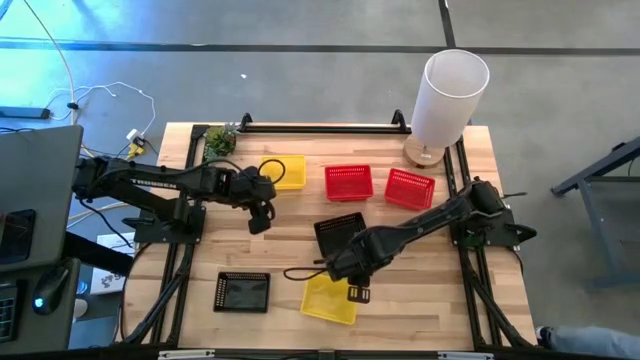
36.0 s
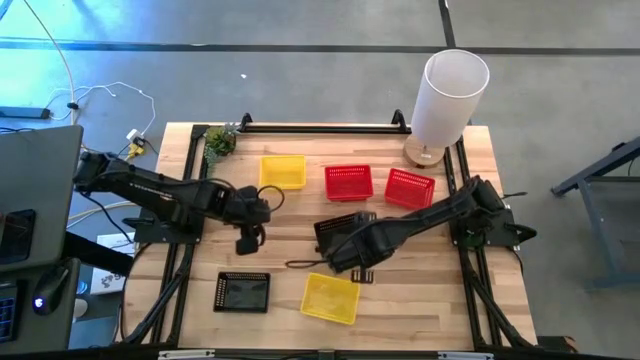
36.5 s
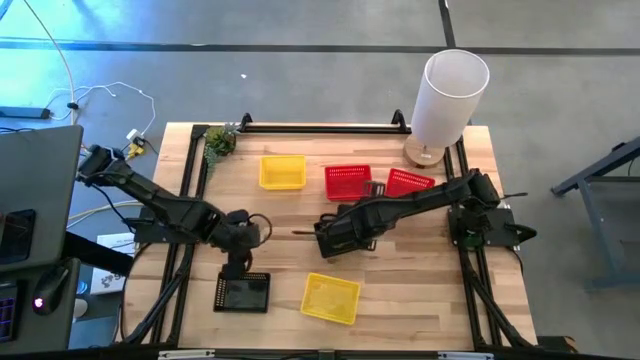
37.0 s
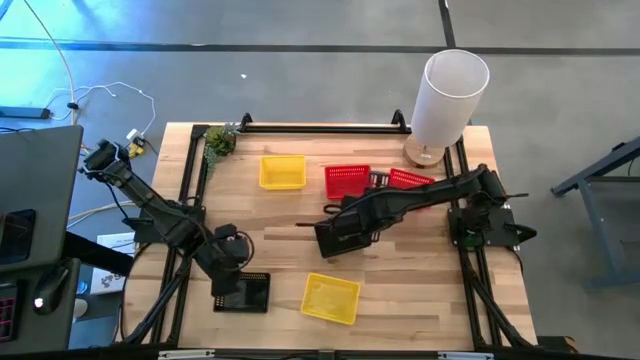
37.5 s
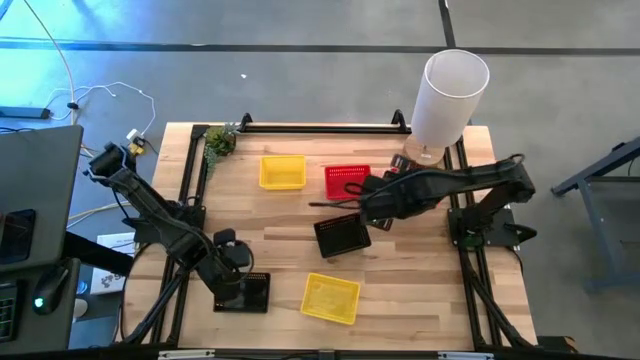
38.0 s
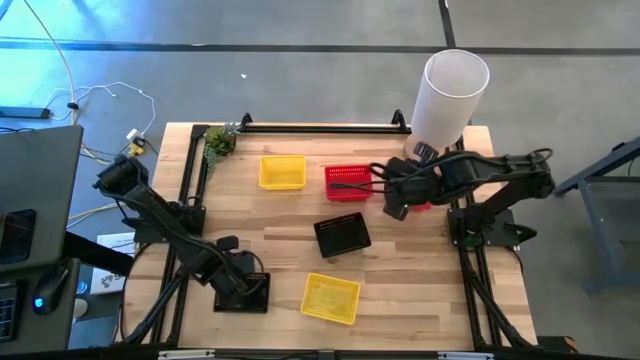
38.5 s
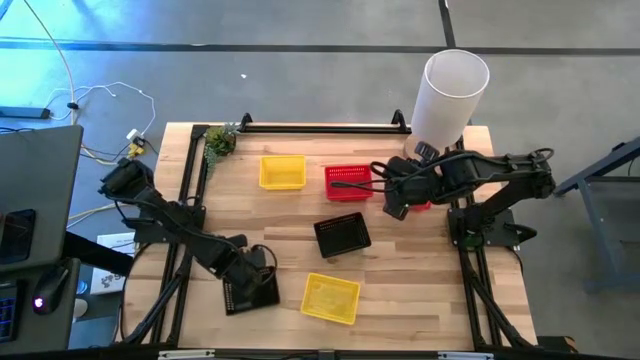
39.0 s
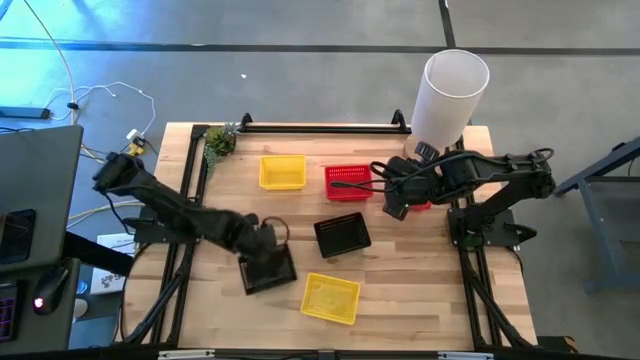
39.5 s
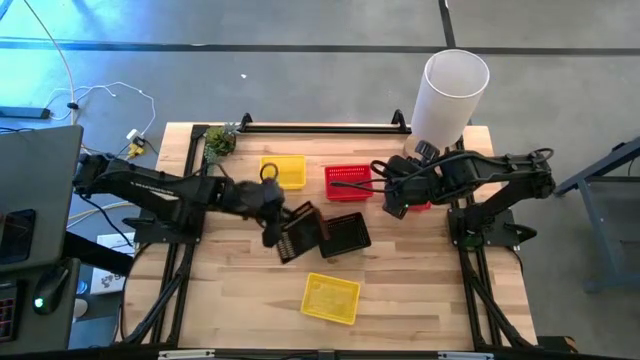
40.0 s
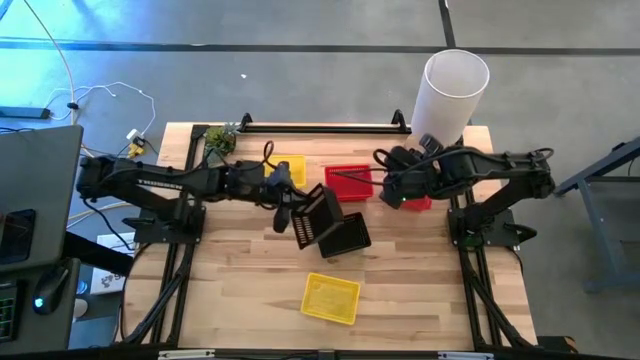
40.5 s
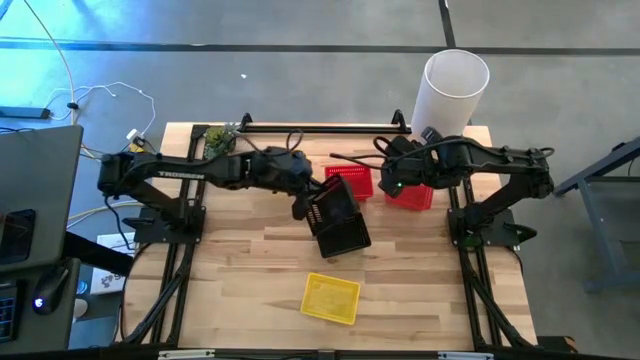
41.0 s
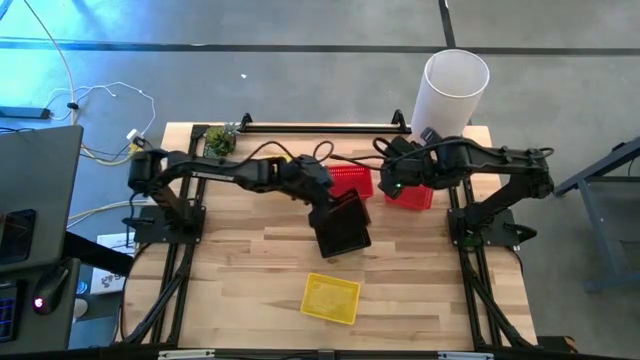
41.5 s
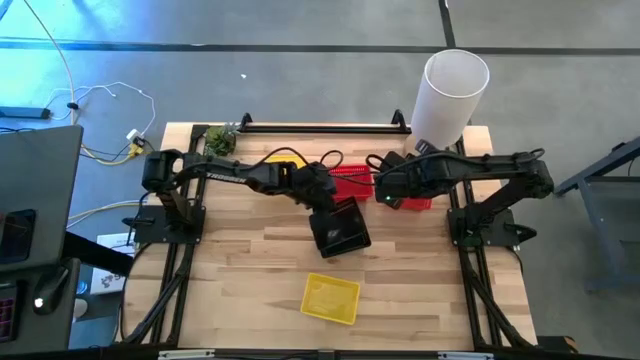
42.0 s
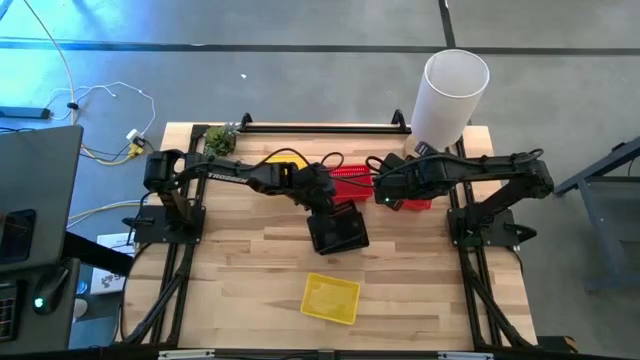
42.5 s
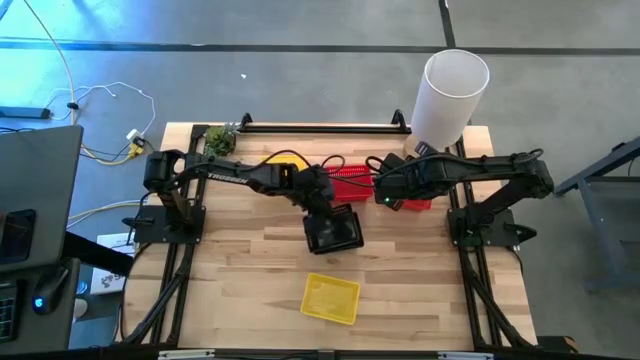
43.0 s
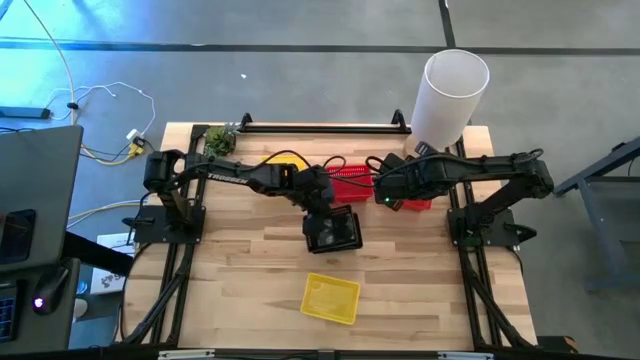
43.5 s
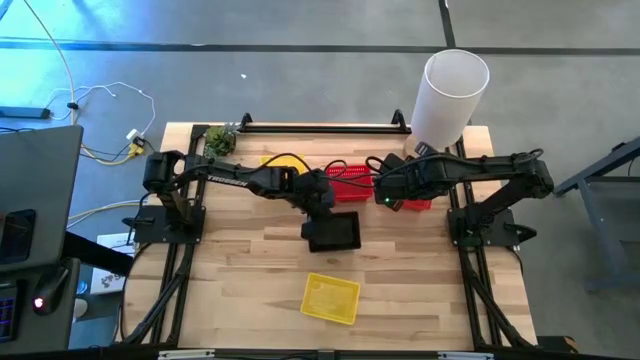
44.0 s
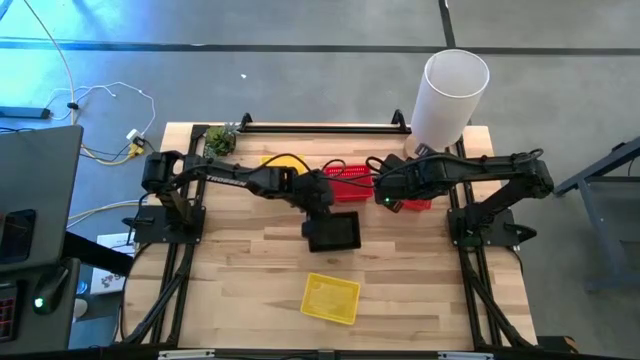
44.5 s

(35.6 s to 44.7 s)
Stack the bottom black bin on the top black bin

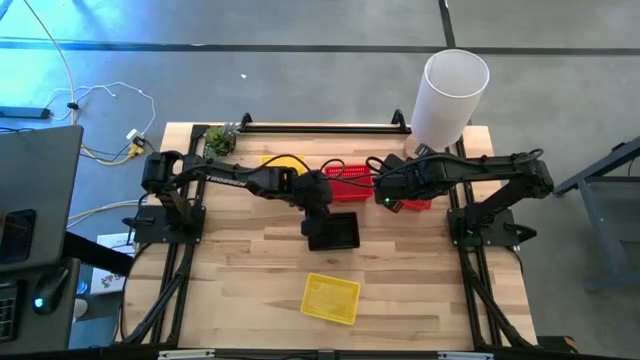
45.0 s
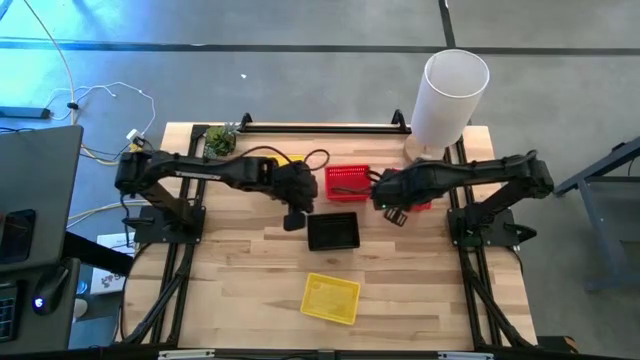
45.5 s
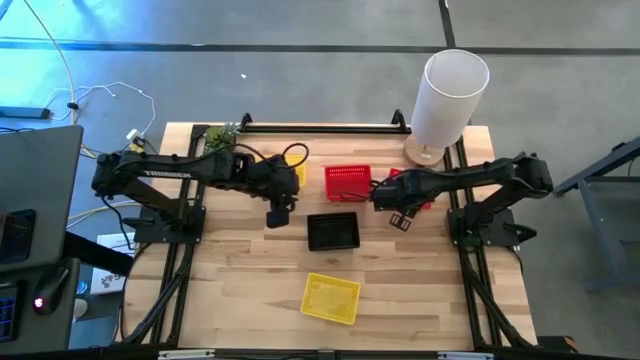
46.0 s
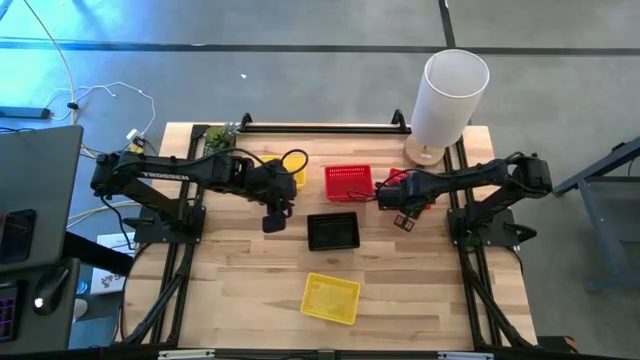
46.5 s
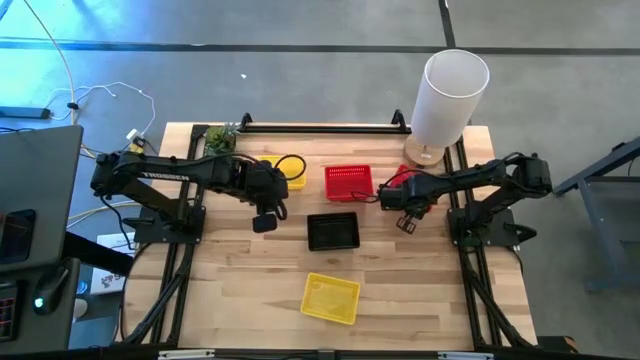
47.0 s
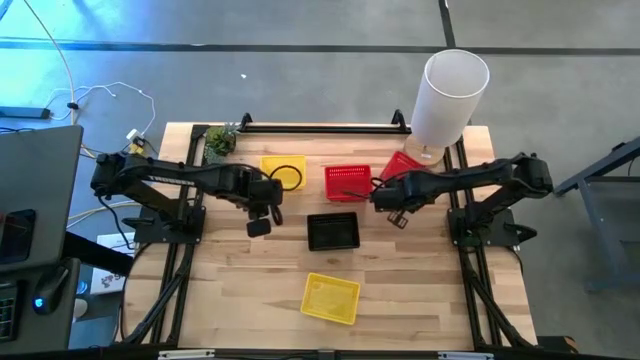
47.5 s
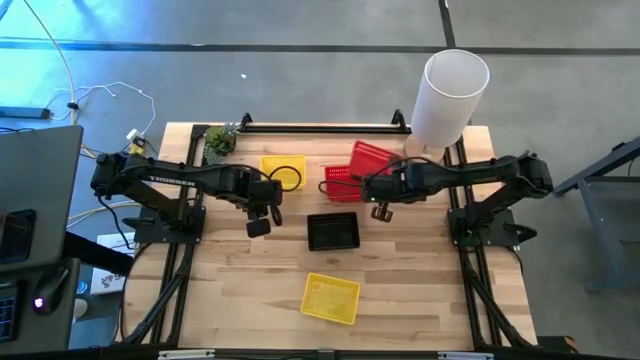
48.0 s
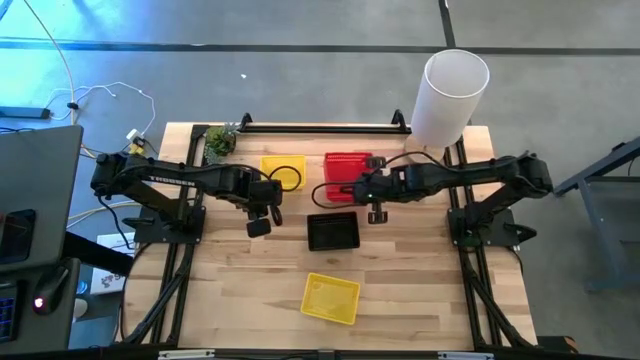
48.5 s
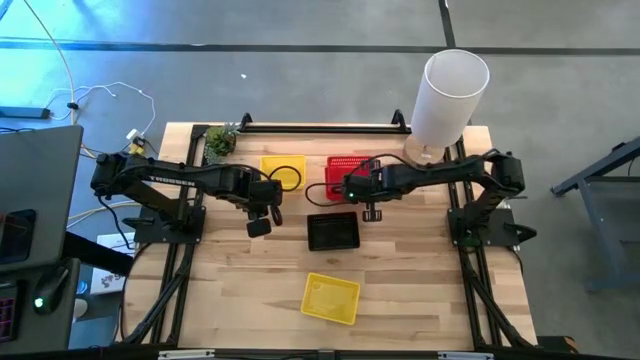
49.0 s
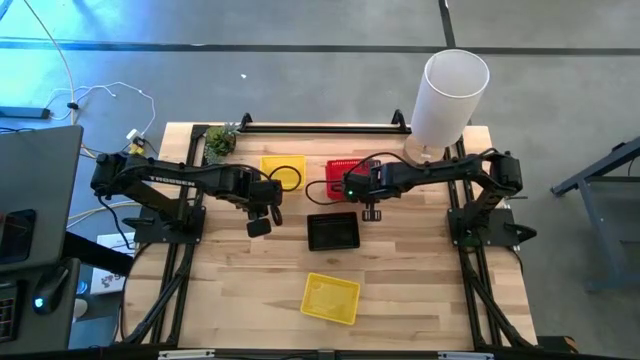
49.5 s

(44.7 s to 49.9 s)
Stack the right red bin on the left red bin

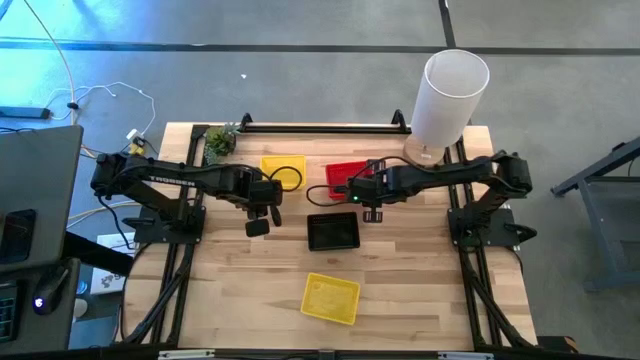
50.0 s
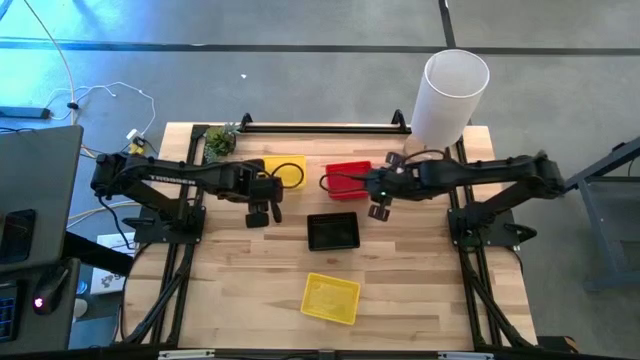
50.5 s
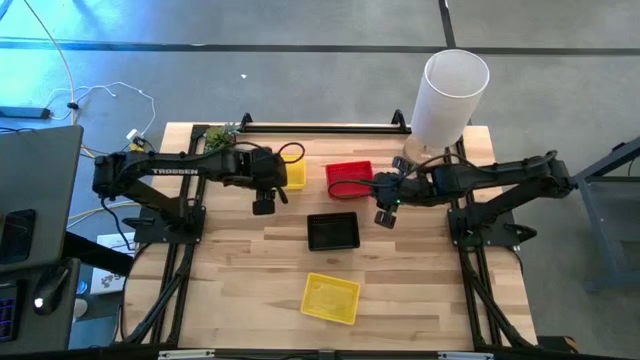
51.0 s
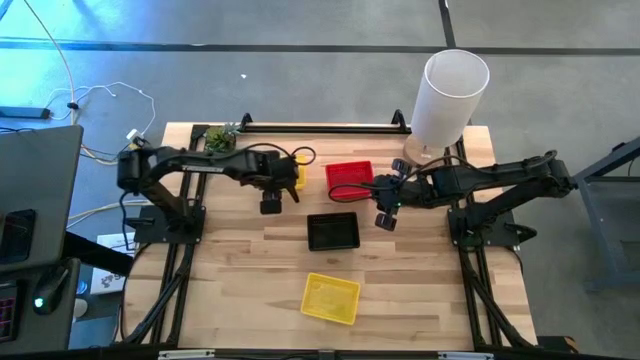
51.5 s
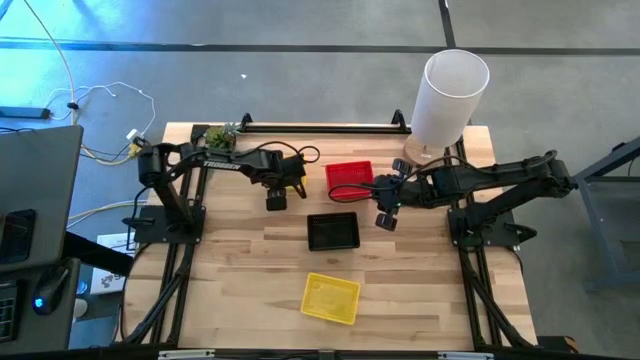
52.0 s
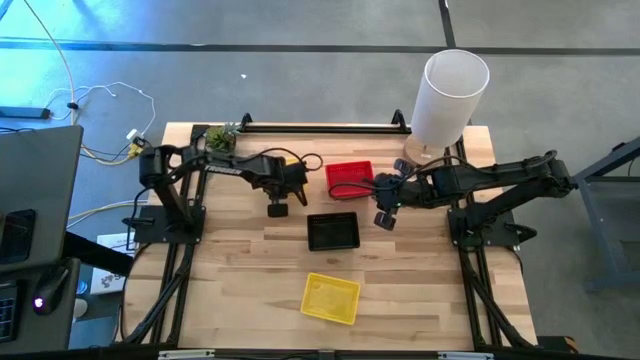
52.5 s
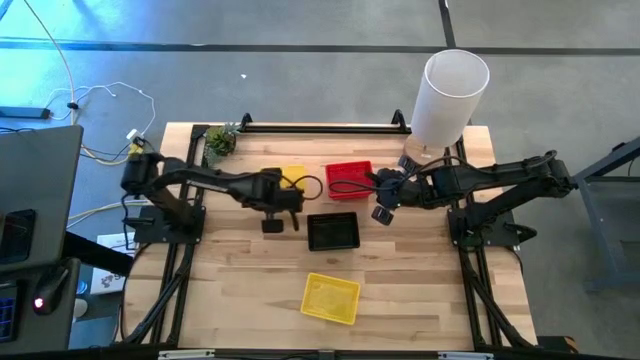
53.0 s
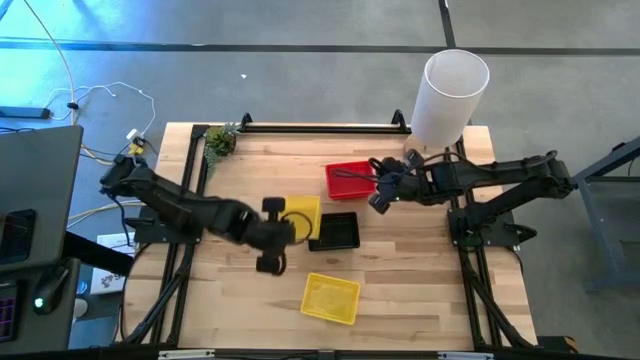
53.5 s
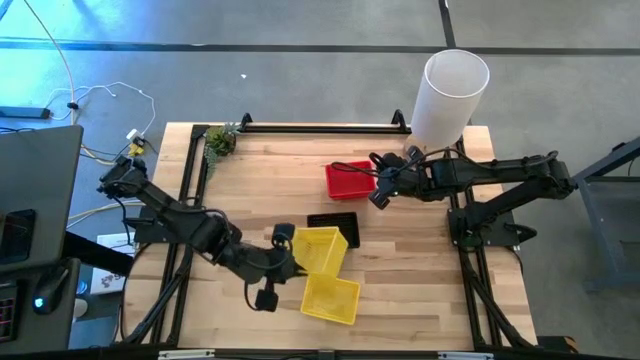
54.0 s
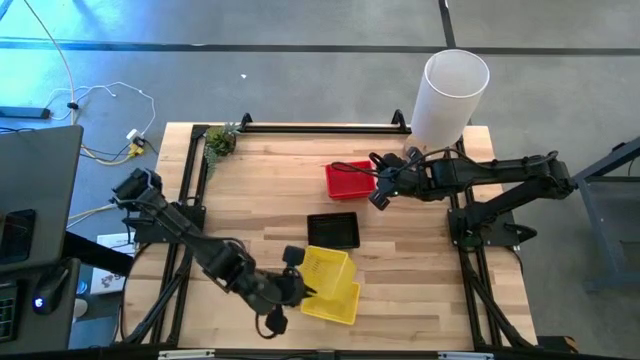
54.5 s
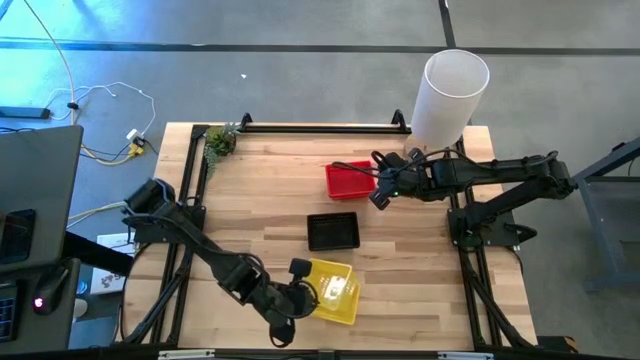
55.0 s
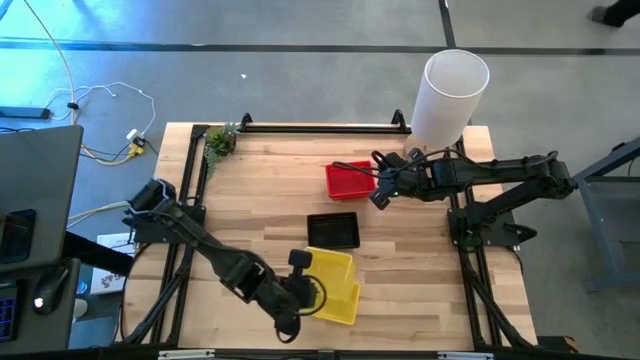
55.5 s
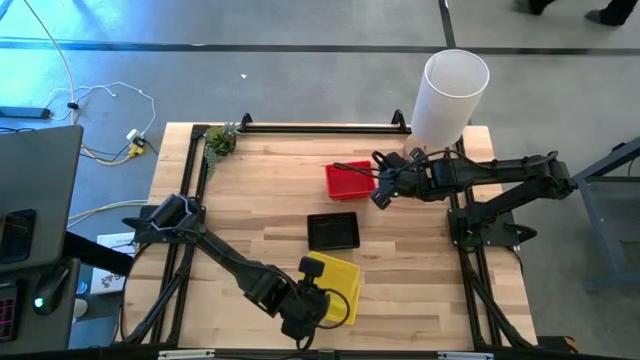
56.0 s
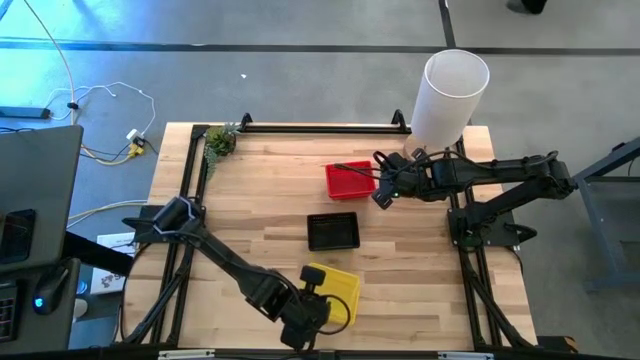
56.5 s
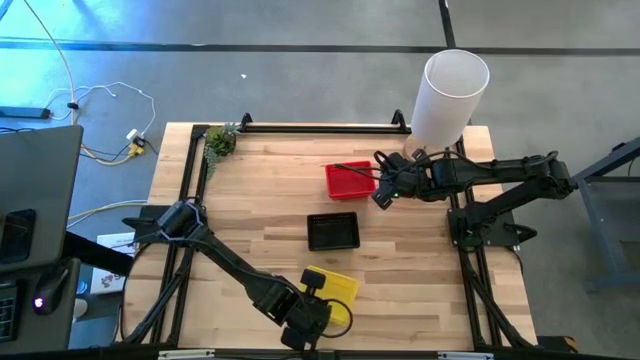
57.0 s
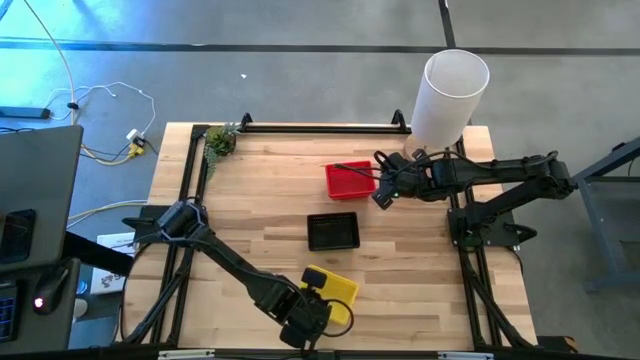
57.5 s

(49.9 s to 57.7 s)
Stack the top yellow bin on the bottom yellow bin
